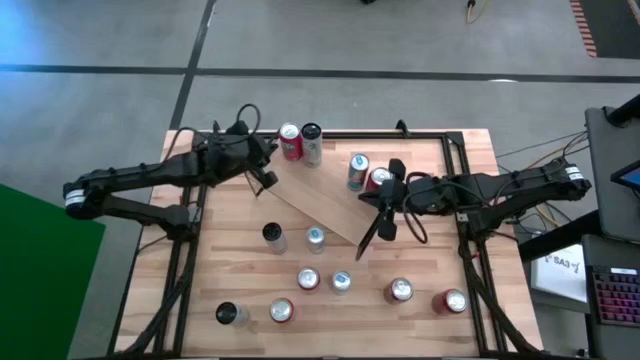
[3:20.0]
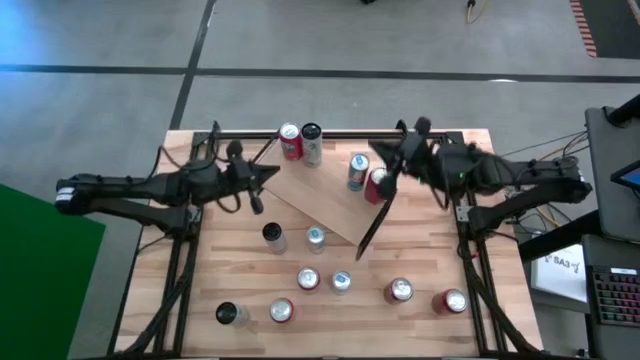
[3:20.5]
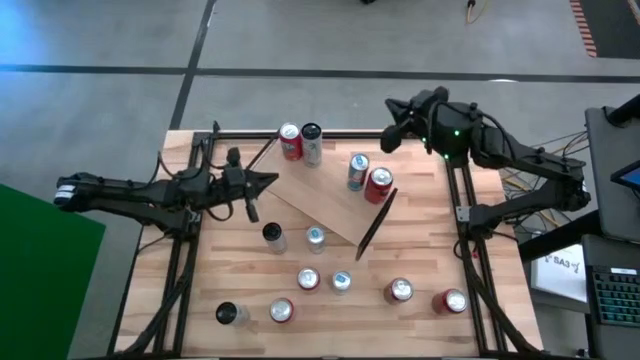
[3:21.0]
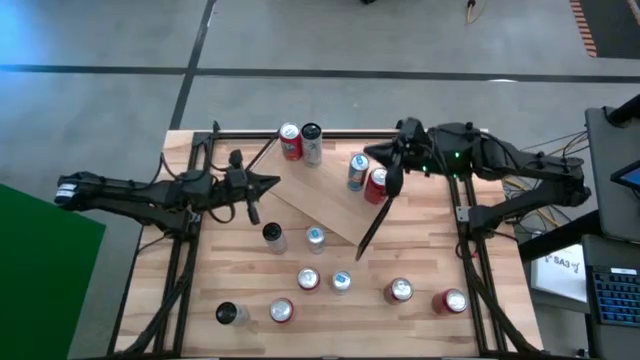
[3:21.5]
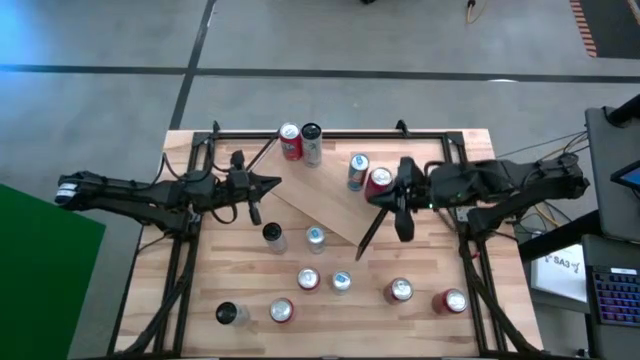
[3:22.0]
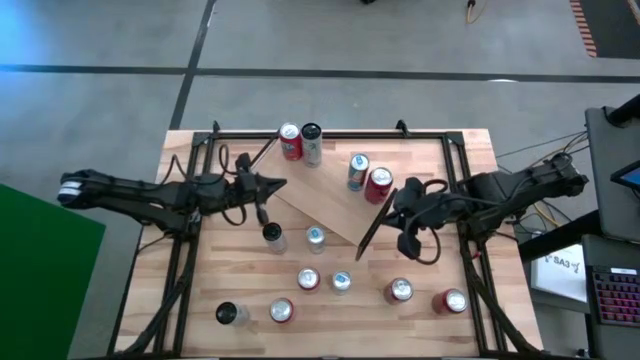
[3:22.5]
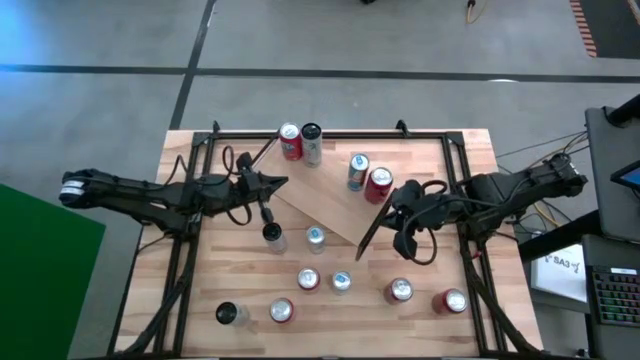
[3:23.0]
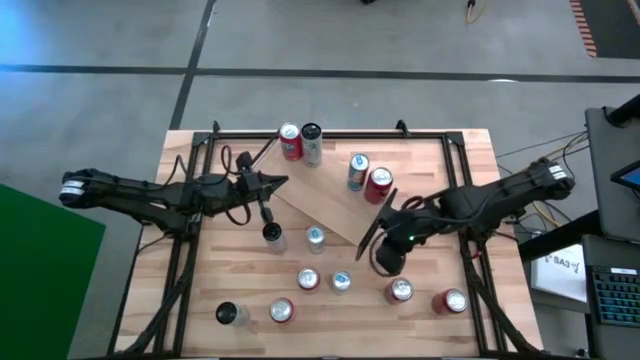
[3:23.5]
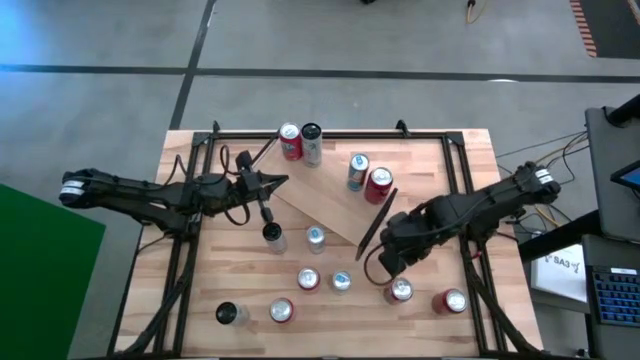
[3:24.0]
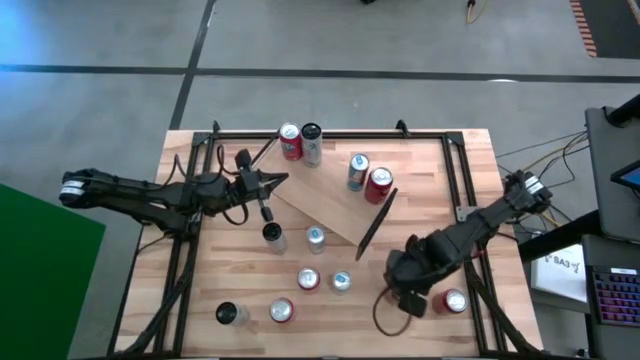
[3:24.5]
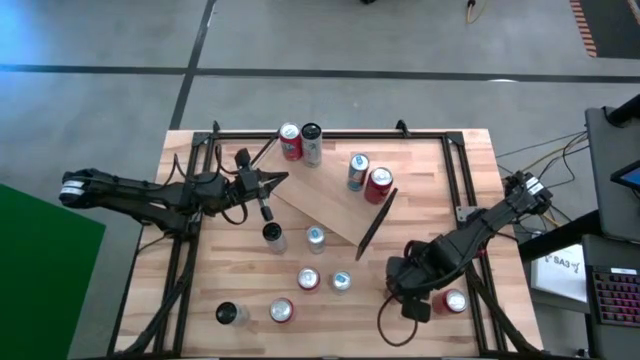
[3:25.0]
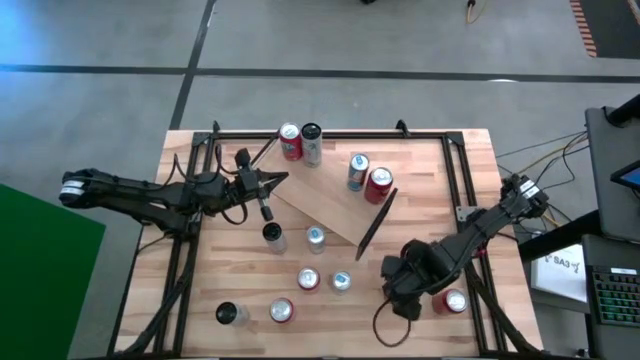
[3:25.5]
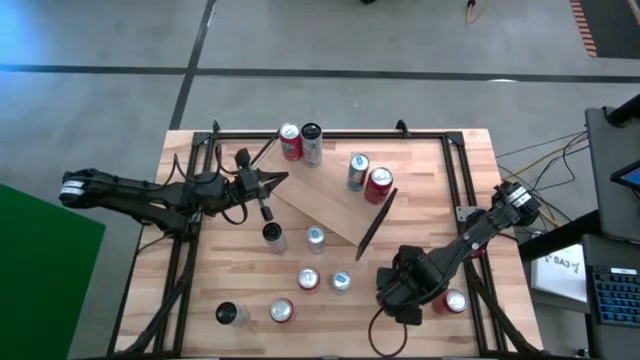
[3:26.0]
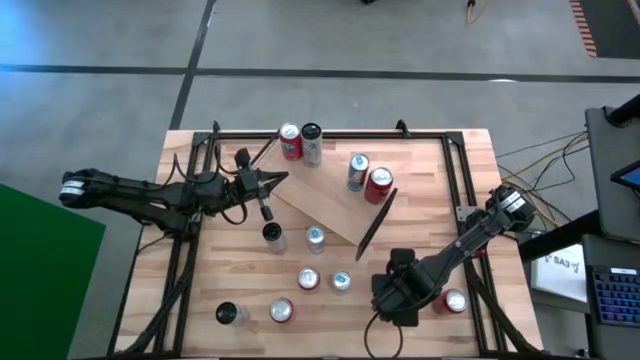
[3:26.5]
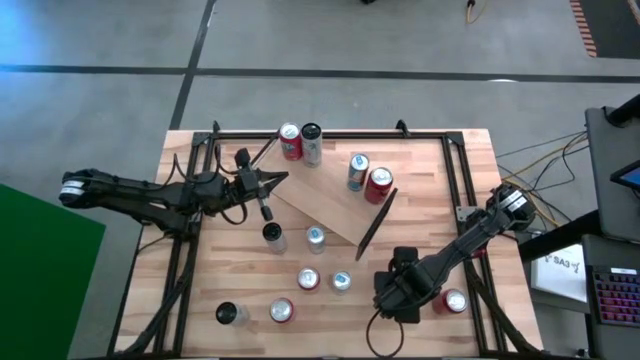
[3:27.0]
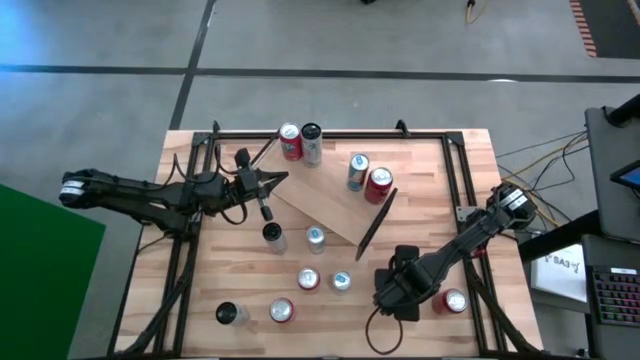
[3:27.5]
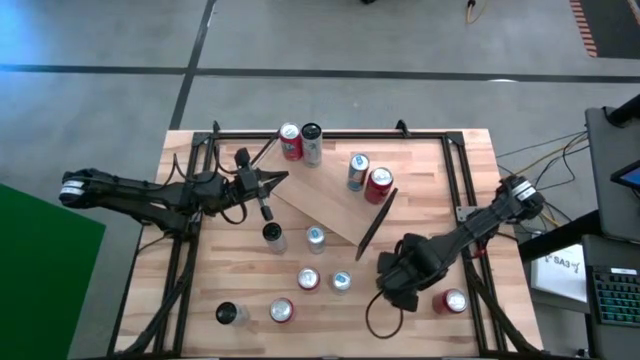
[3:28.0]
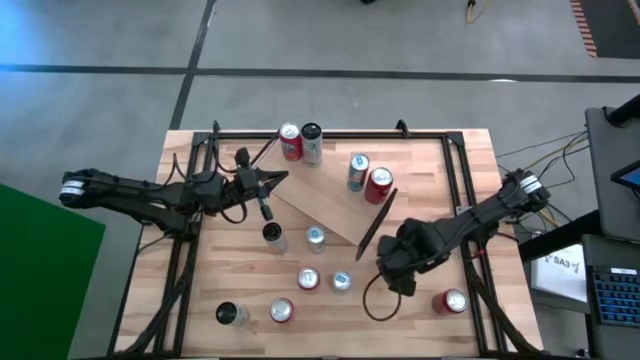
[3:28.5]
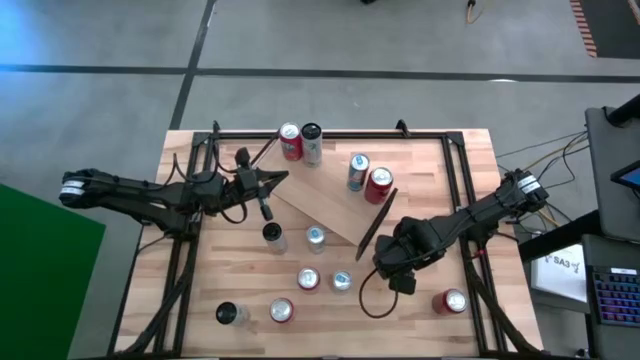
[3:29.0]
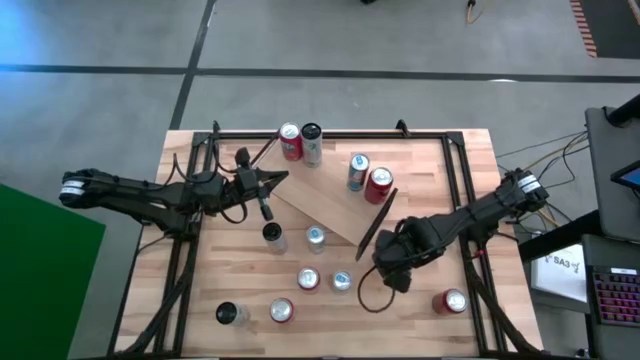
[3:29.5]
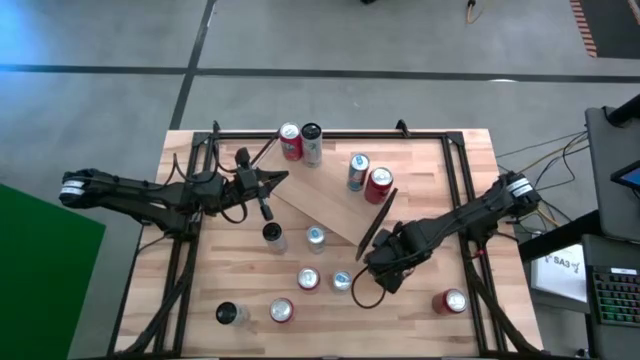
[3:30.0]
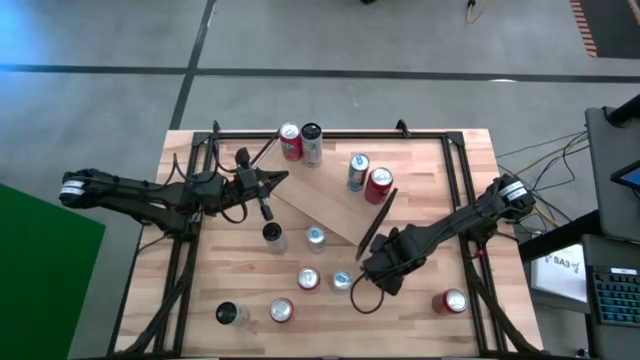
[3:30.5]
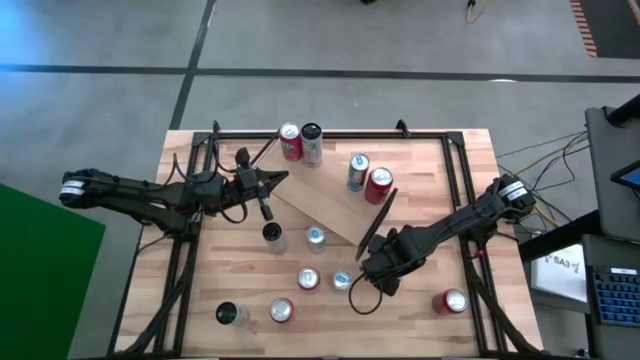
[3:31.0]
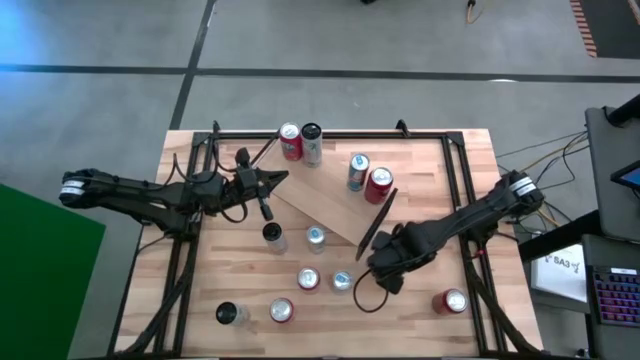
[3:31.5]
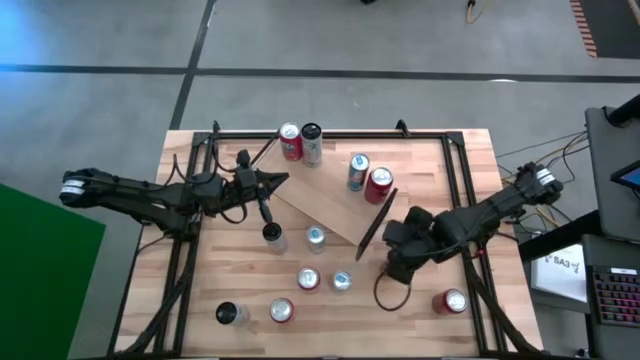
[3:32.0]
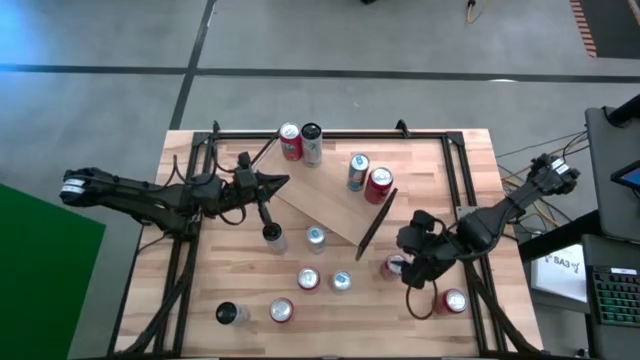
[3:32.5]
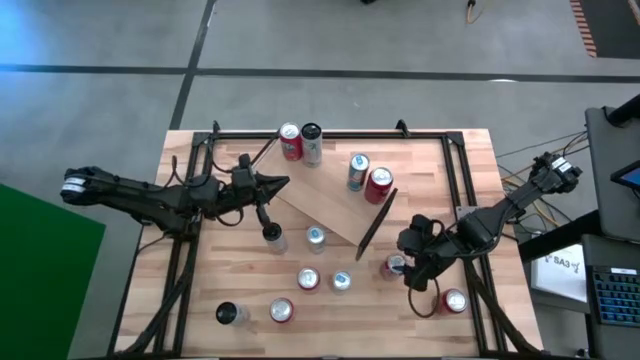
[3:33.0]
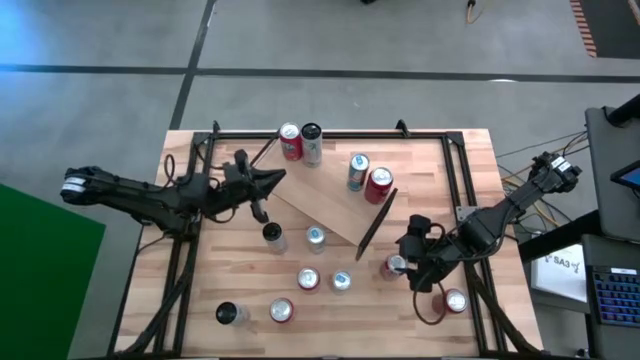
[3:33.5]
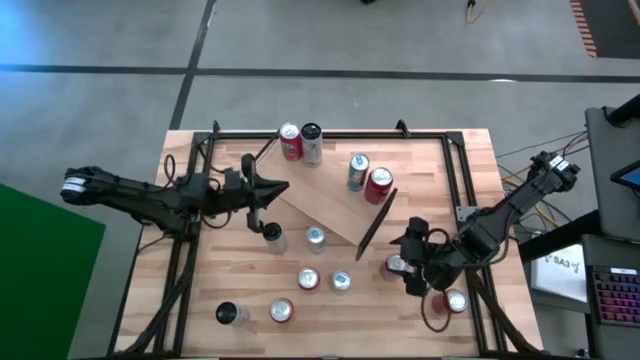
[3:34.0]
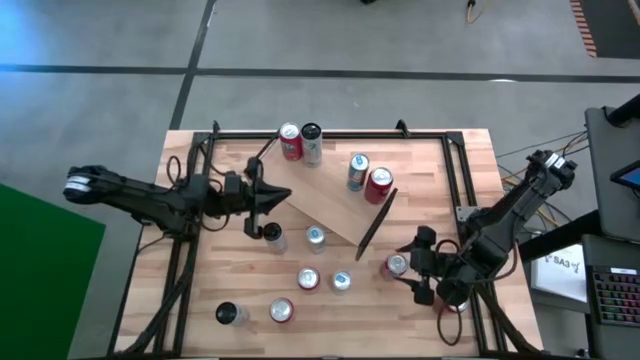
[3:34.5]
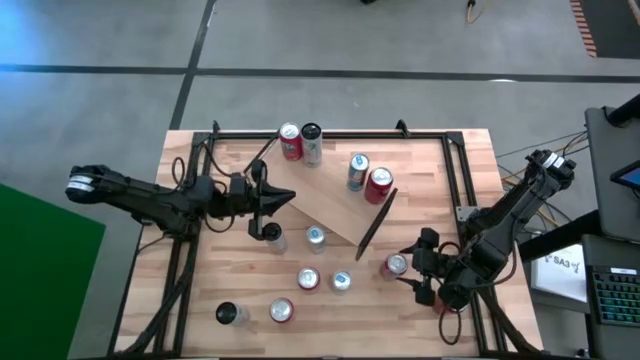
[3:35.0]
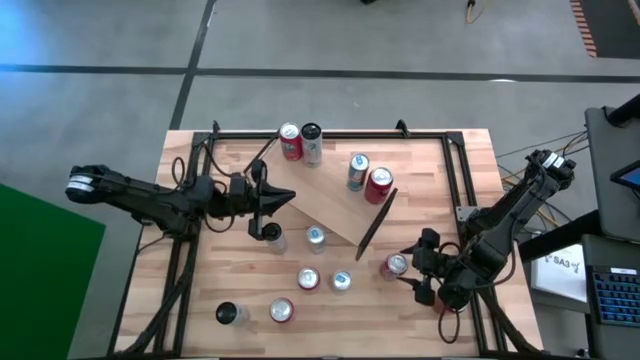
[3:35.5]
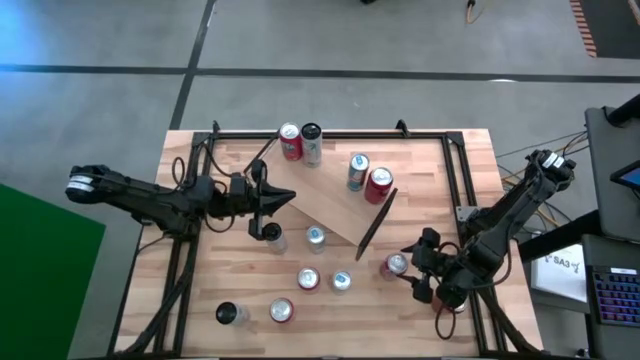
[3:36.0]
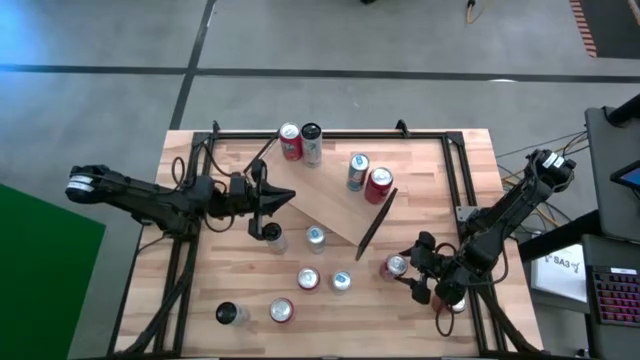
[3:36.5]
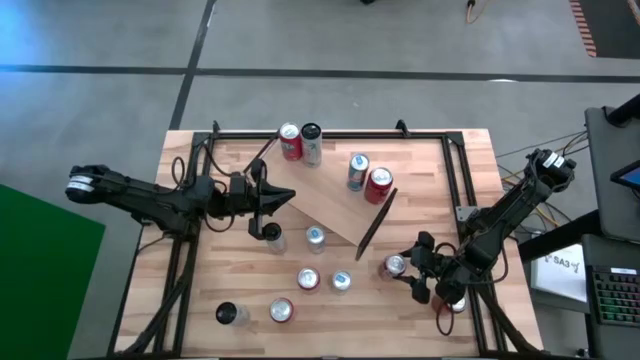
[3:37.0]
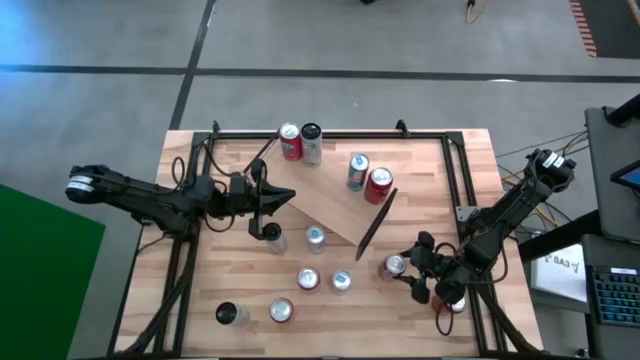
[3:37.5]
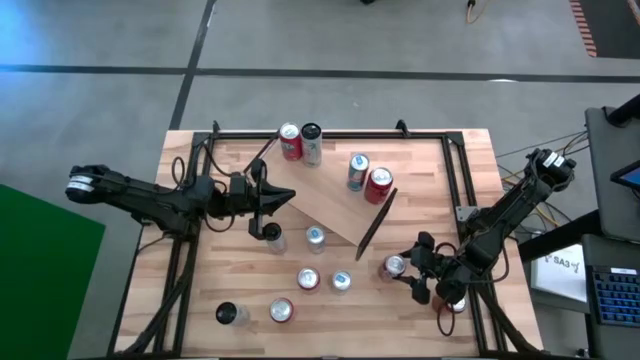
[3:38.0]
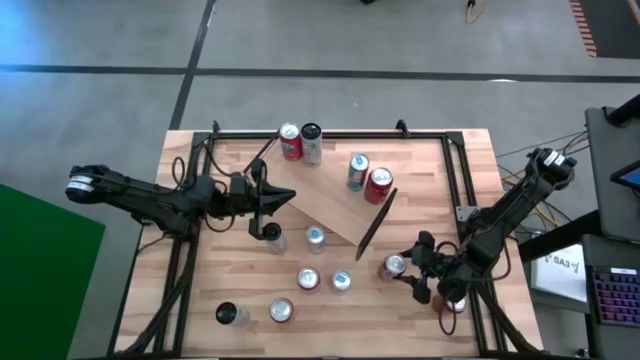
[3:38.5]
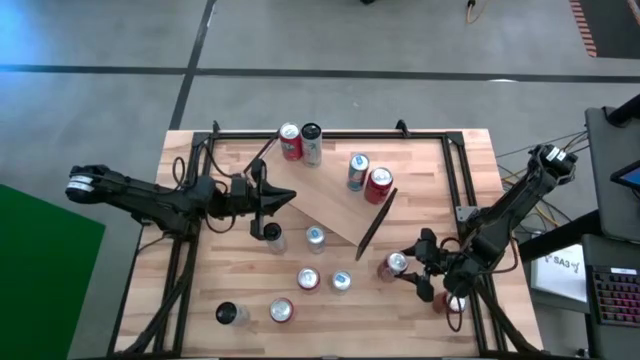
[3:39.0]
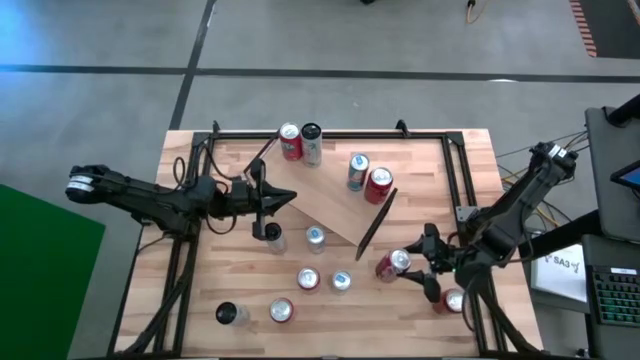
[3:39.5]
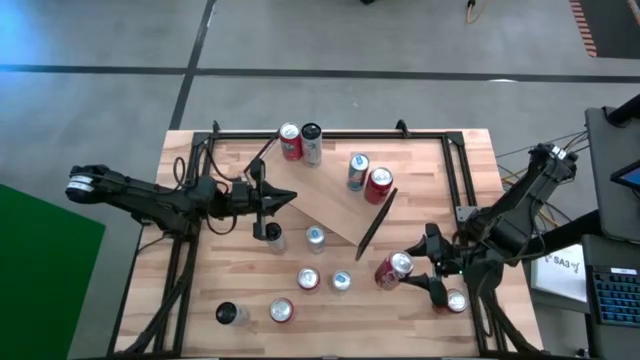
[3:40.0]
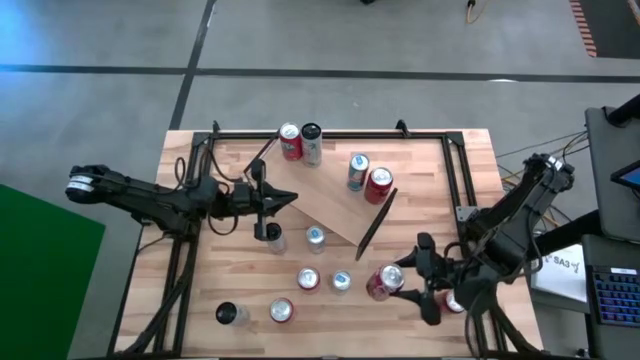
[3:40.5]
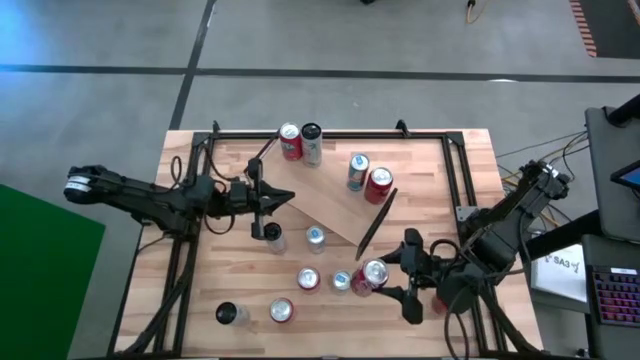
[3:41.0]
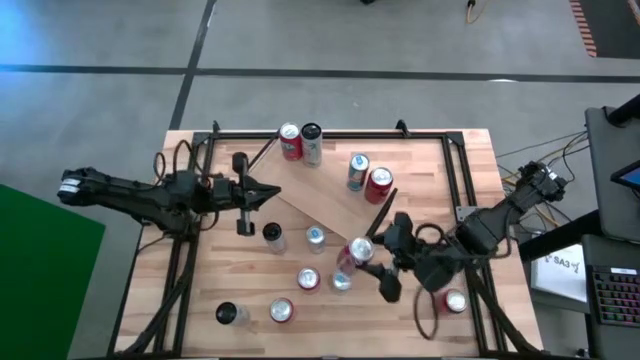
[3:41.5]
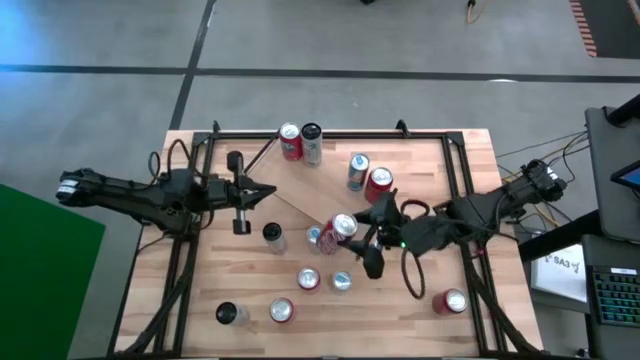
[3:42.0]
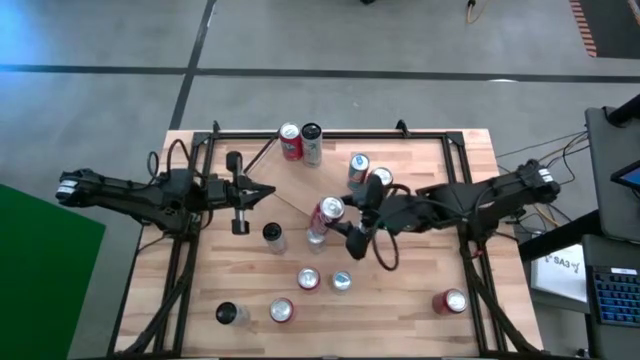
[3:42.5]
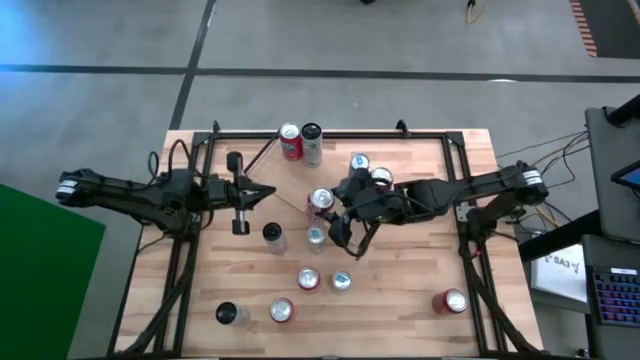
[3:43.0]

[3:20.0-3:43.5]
Task: Place canned beverage on shelf
Put the red/white soda can on the shelf
